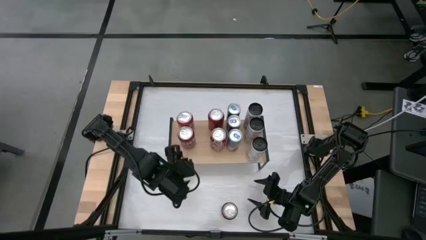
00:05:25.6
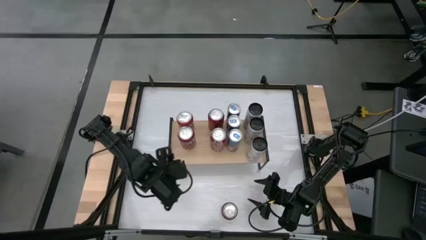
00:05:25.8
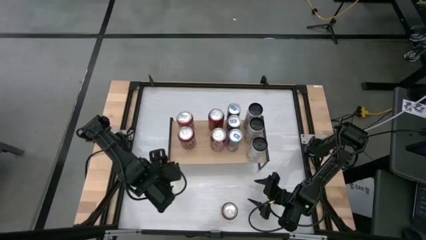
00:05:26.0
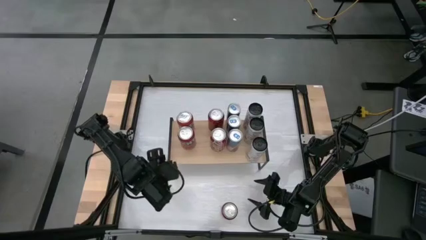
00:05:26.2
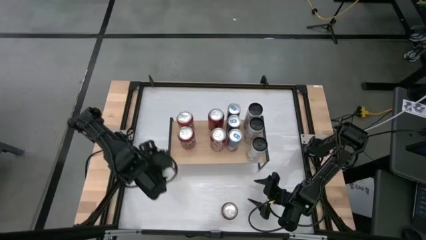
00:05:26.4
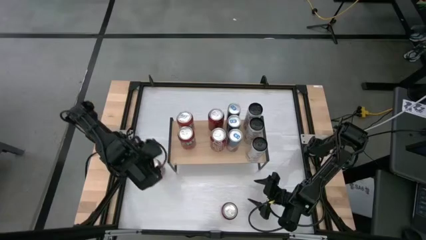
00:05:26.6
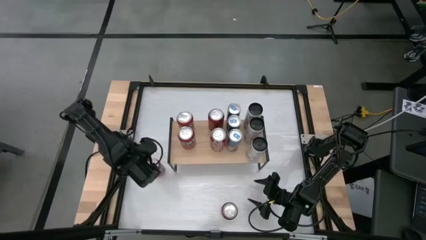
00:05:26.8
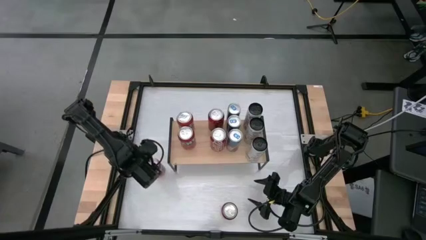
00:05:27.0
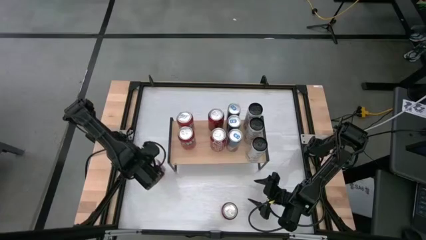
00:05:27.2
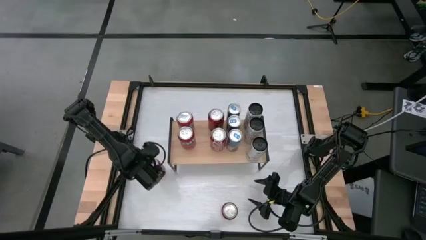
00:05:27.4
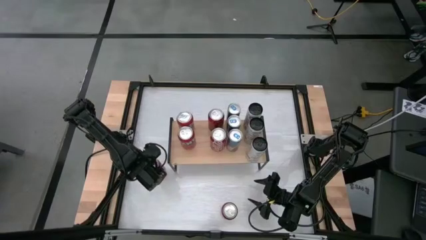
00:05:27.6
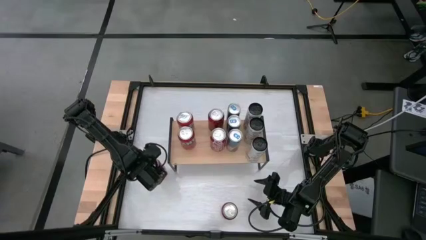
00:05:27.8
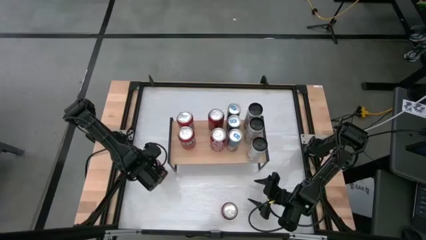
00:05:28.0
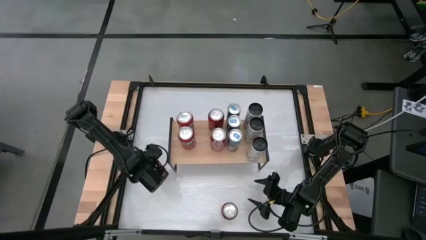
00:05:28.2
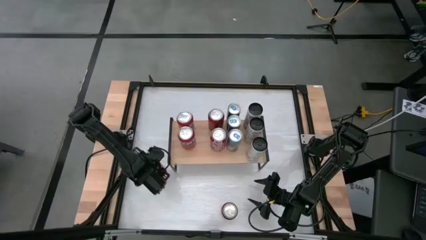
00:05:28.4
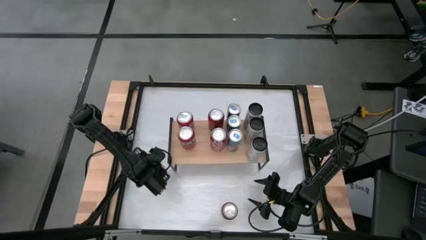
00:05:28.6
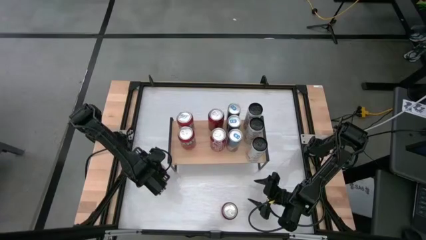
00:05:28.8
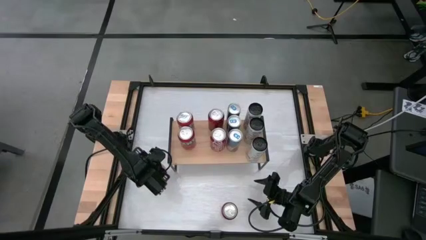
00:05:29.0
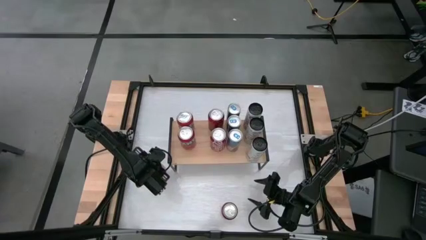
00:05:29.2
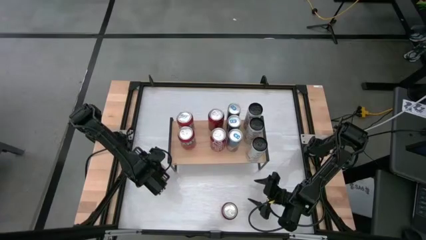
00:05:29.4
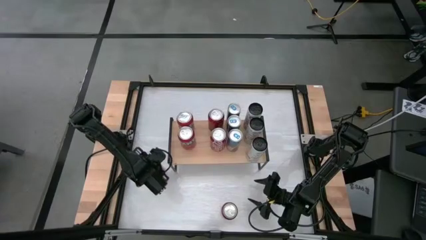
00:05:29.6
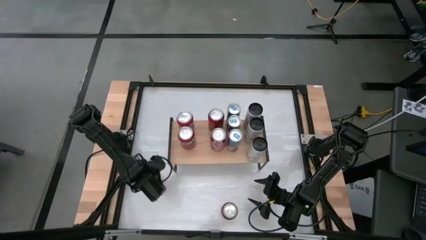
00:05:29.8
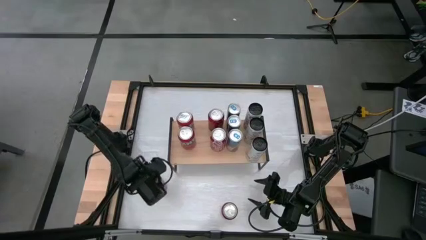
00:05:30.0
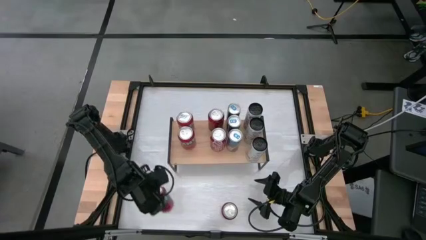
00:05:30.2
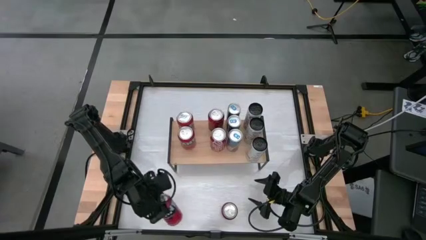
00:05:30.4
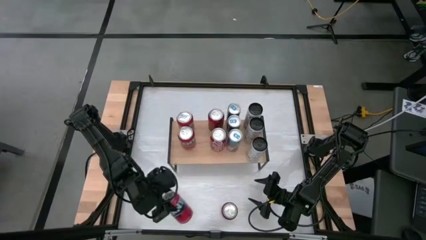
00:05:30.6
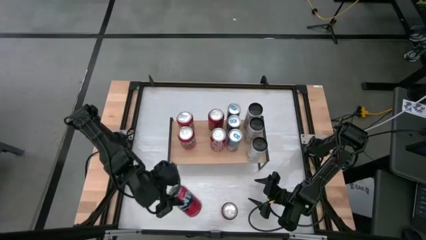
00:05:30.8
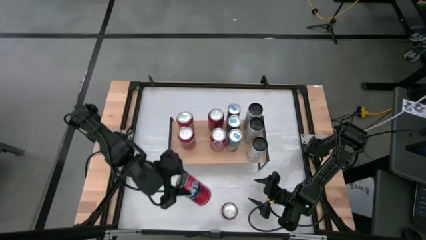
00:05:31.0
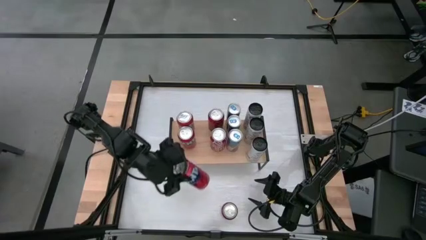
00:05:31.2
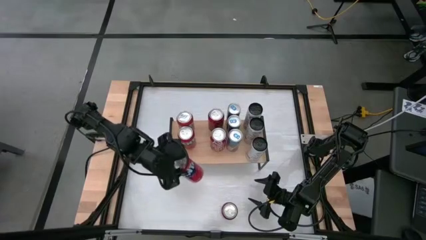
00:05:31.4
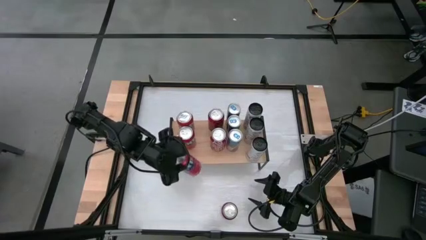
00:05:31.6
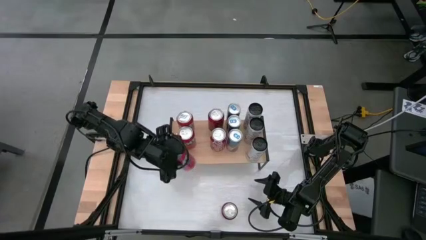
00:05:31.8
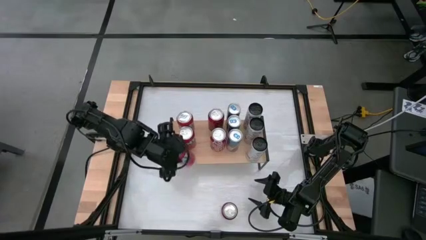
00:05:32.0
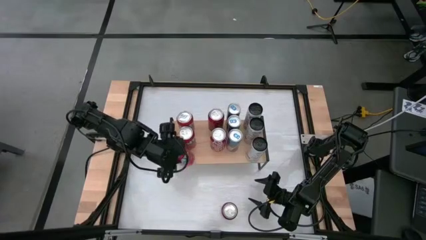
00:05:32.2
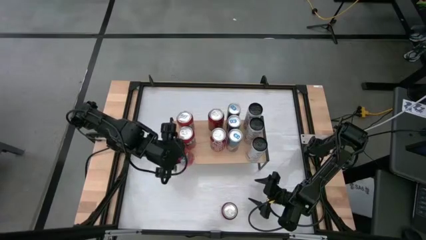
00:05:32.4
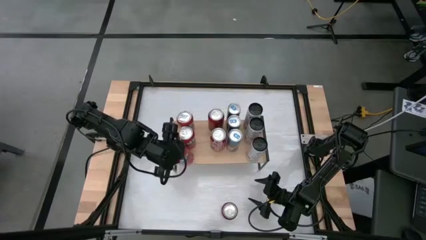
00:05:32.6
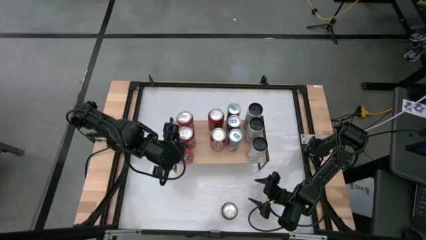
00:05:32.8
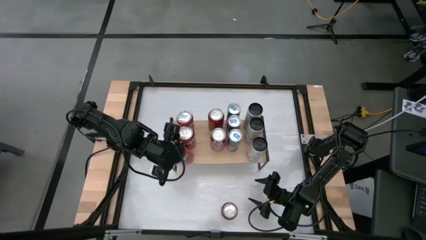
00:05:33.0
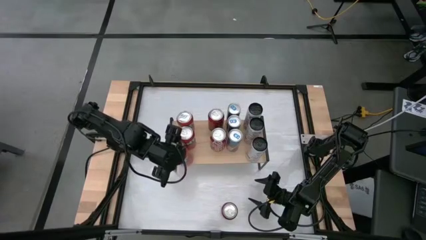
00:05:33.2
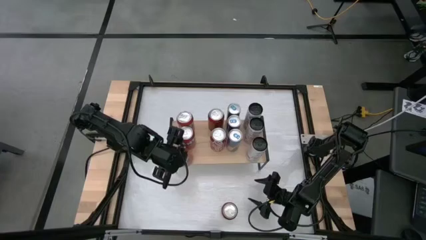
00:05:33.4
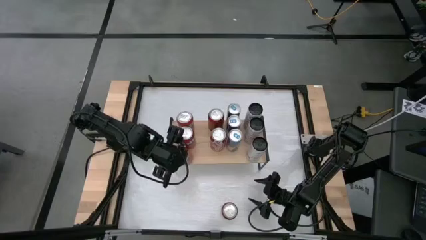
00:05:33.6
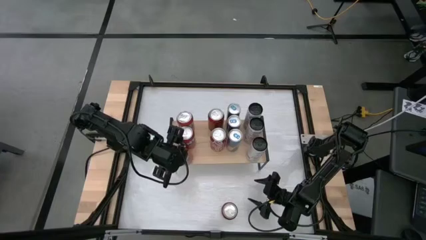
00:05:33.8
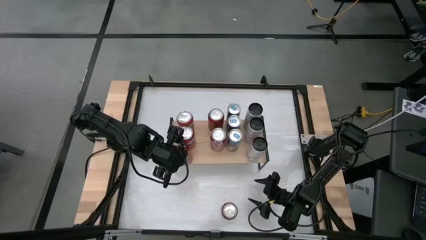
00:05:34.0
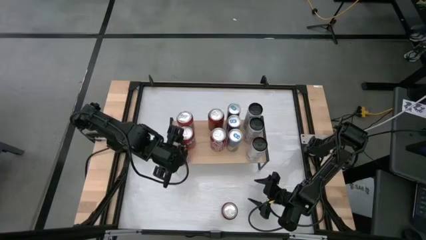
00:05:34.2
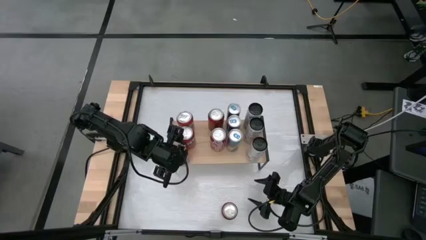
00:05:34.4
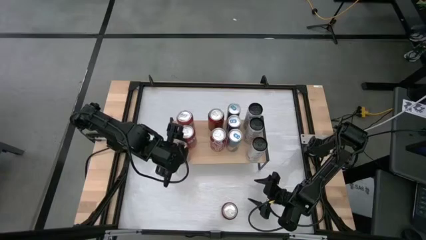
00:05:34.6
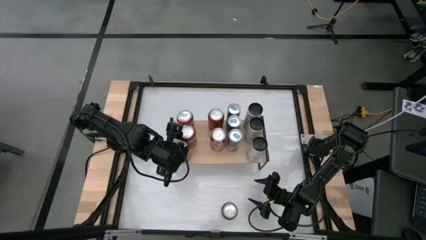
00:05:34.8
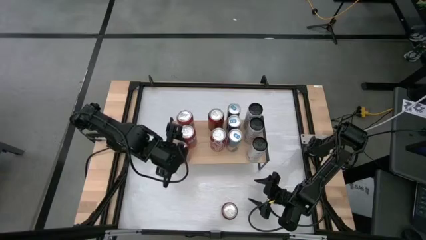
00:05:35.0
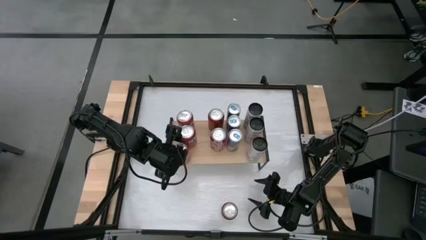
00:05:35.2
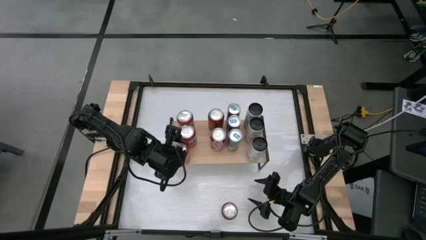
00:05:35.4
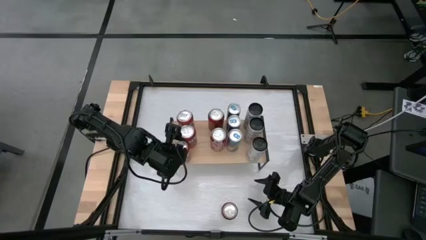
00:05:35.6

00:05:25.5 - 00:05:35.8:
Task: Place canned beverage on shelf
Put the red soda can on the shelf aligned with the other red soda cans

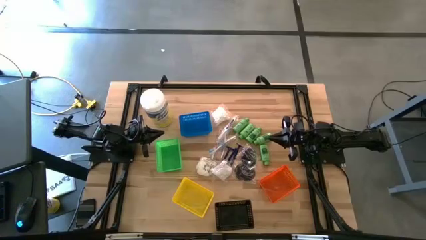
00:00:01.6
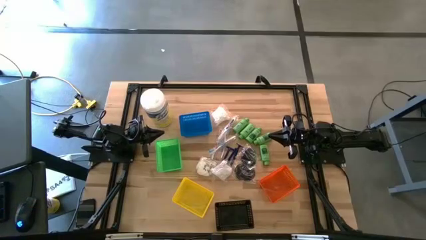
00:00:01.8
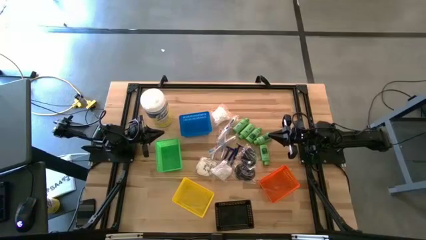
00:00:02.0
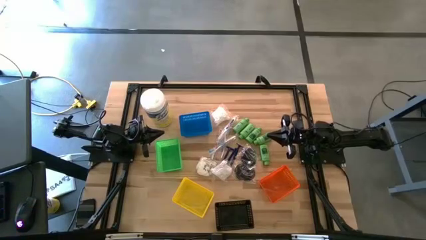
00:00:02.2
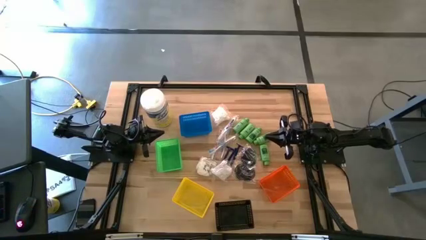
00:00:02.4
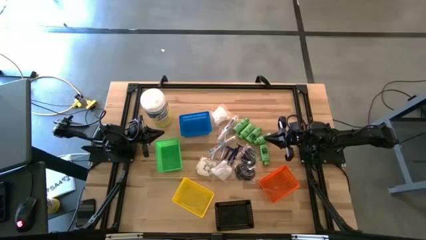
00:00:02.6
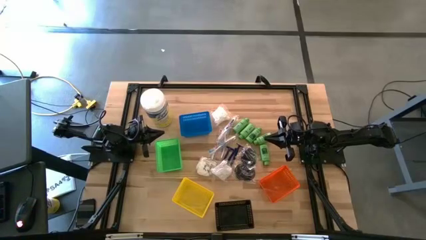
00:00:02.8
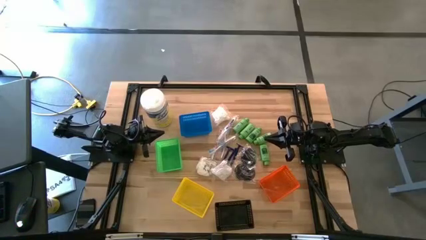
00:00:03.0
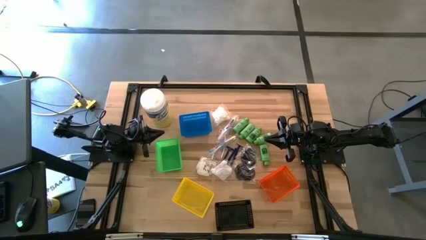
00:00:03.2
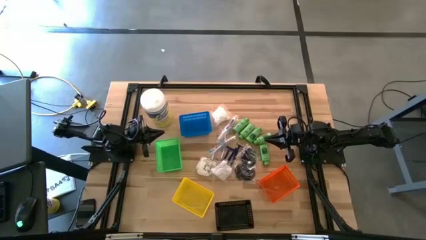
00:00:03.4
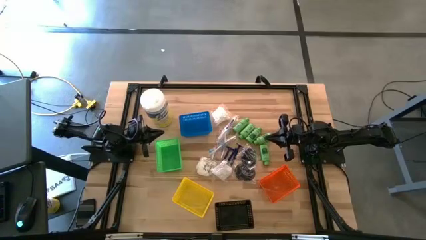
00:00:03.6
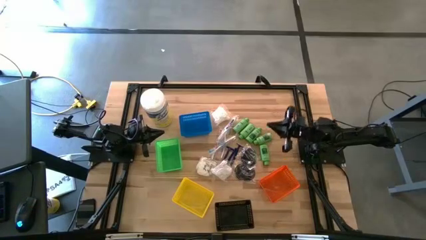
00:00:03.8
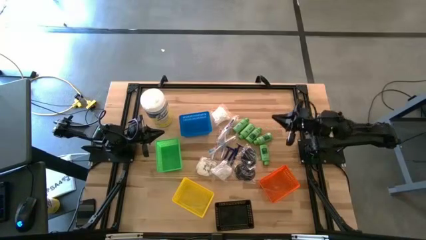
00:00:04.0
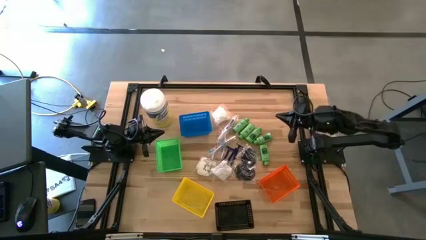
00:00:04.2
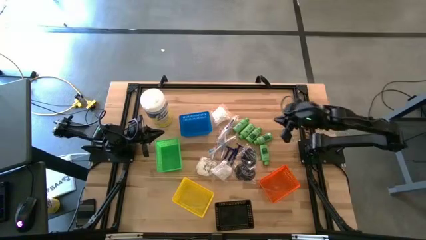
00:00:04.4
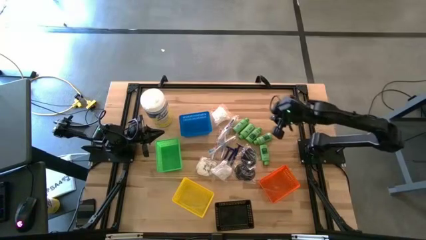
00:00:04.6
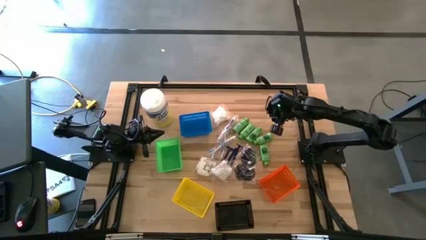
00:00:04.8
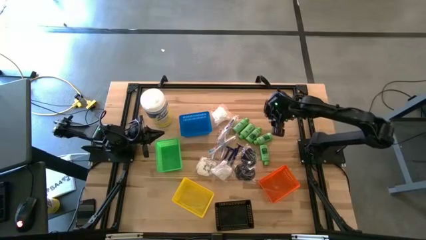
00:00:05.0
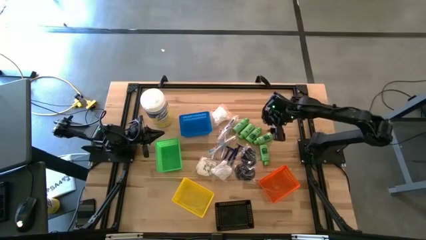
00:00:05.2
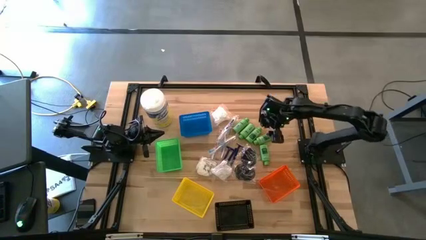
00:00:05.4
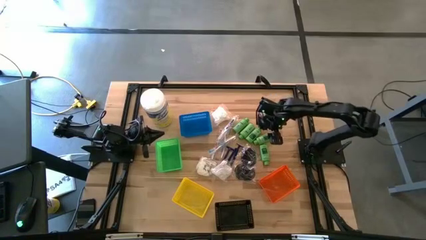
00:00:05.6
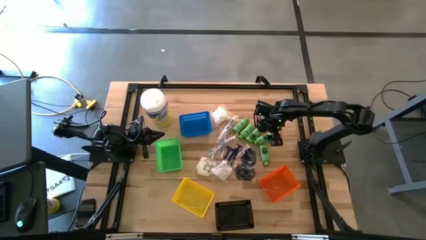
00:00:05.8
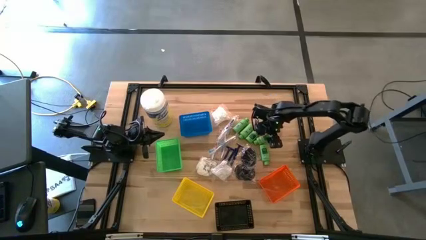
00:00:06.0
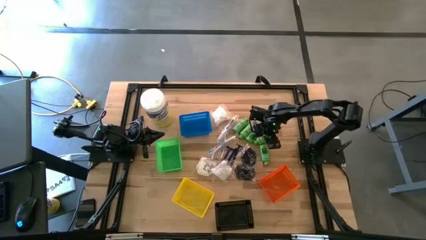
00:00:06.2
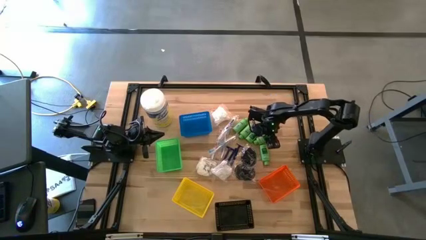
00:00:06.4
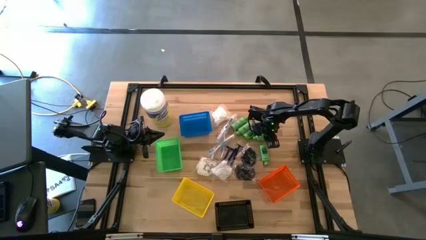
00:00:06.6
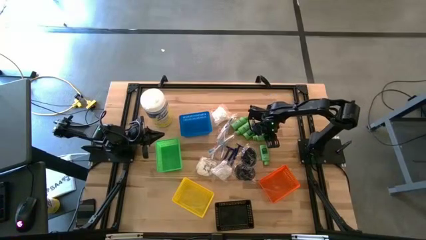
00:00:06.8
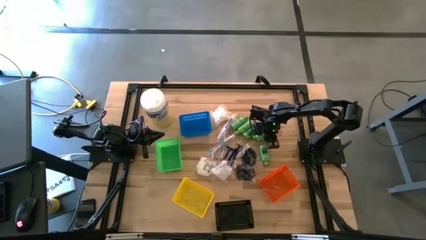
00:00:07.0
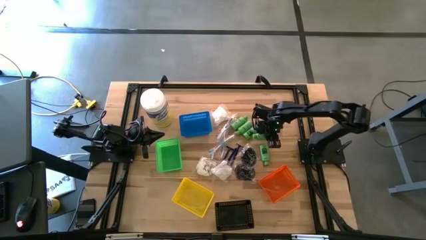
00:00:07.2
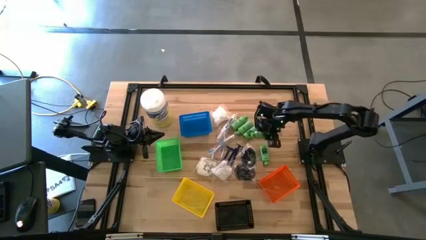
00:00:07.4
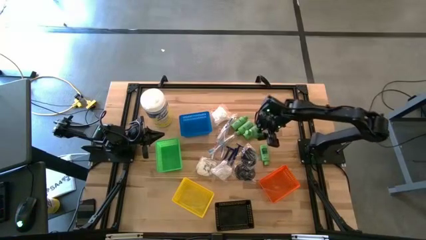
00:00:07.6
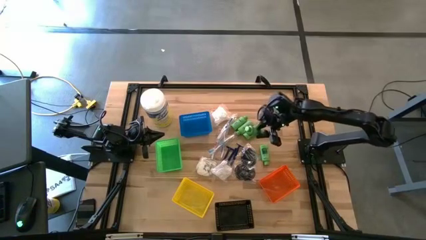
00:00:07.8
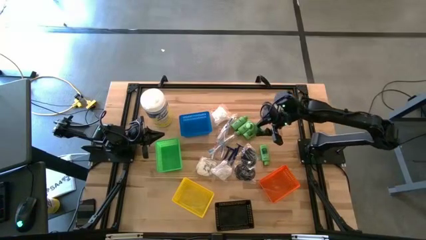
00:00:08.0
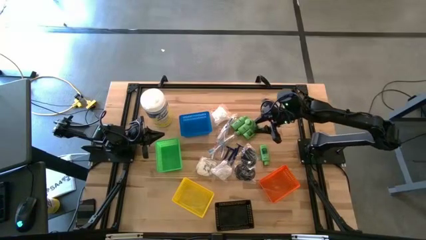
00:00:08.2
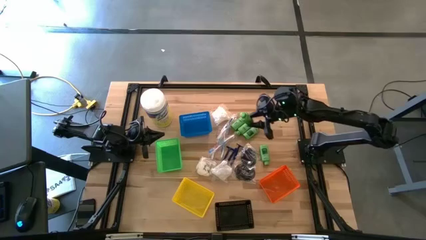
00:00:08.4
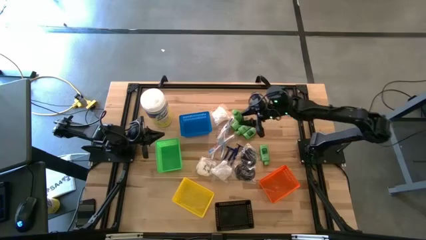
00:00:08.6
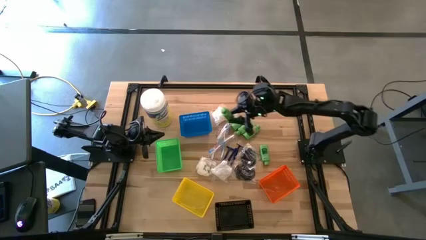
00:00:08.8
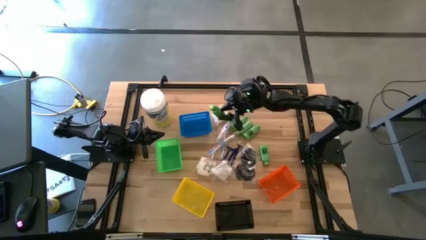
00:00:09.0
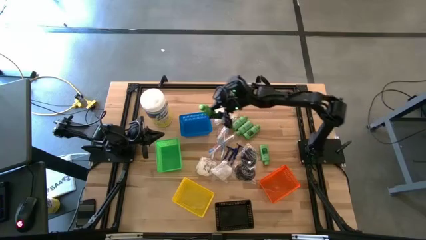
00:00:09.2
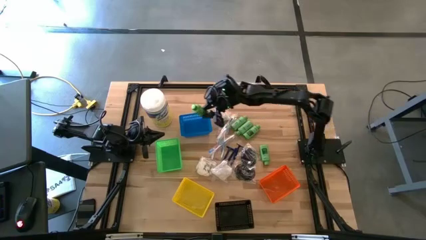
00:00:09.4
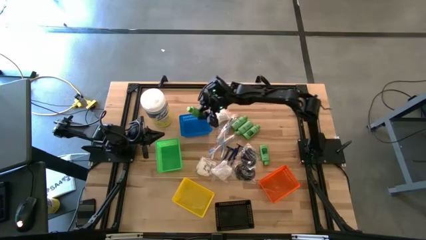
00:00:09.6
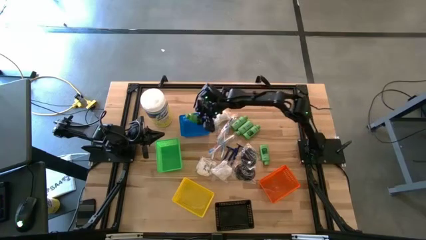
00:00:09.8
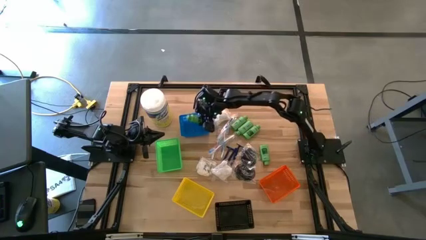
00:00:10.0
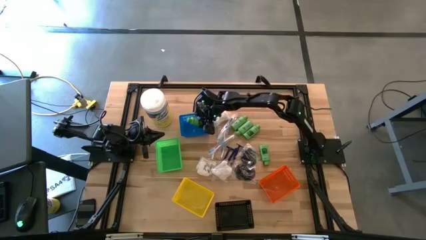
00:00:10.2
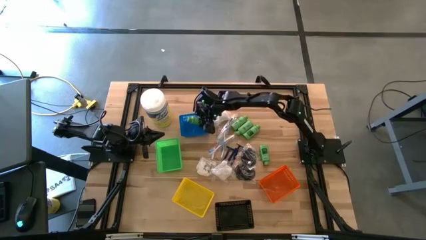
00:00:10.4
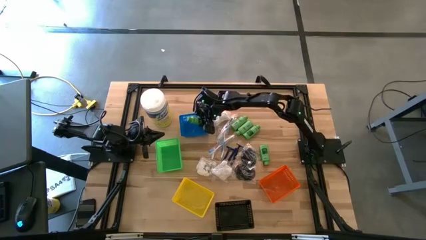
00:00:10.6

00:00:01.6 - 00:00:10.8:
Task: Pick & Place Travel size toiletries
Put the green shampoo into the blue bin
